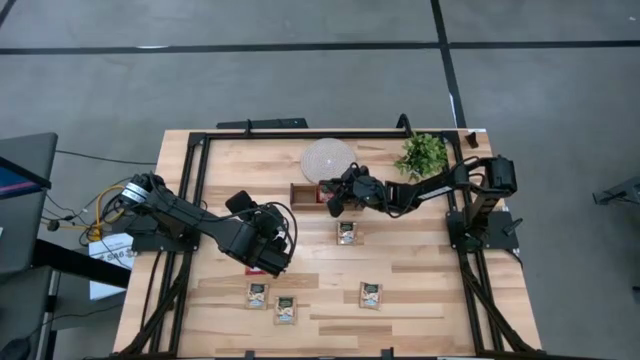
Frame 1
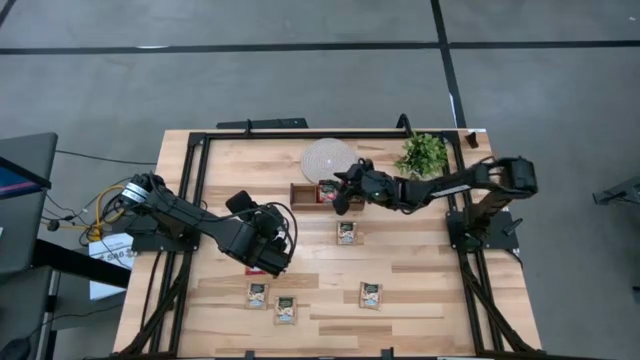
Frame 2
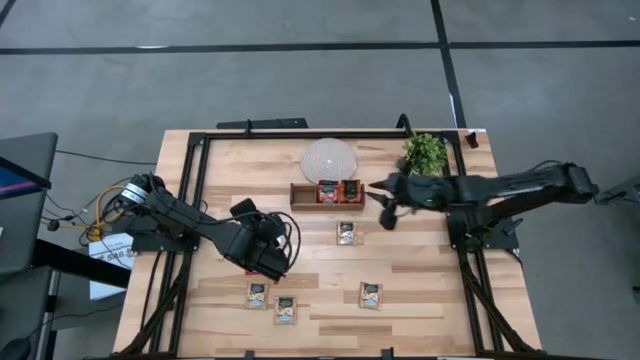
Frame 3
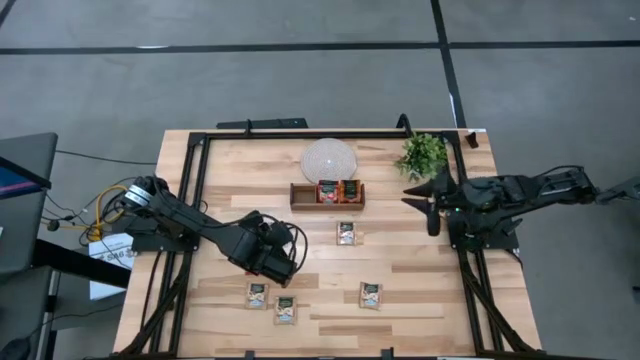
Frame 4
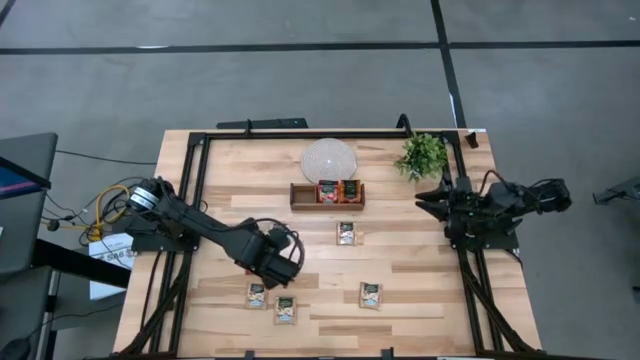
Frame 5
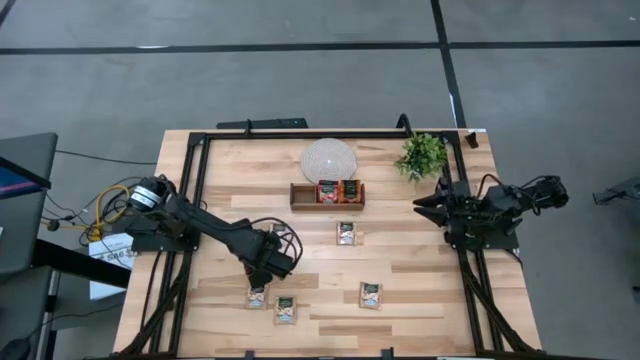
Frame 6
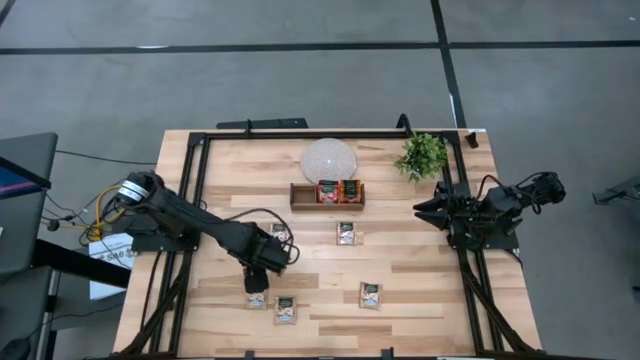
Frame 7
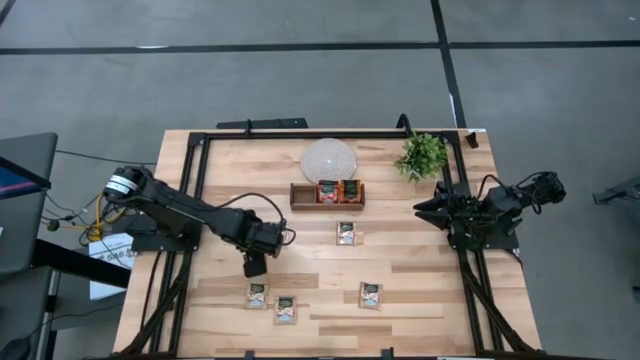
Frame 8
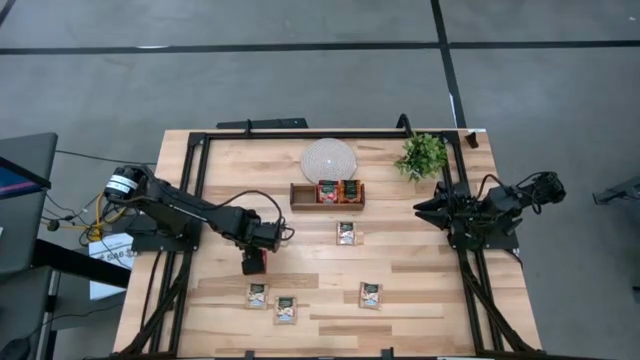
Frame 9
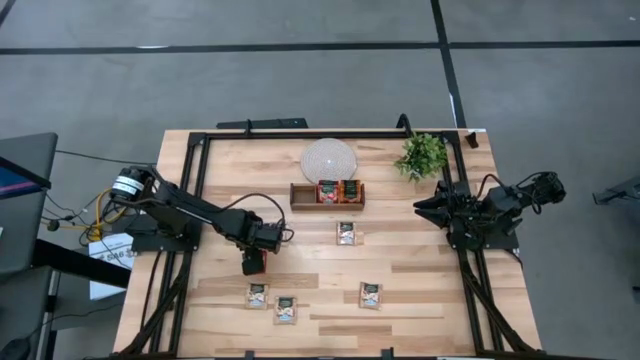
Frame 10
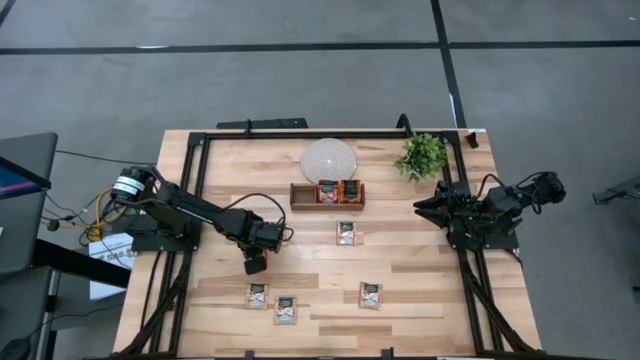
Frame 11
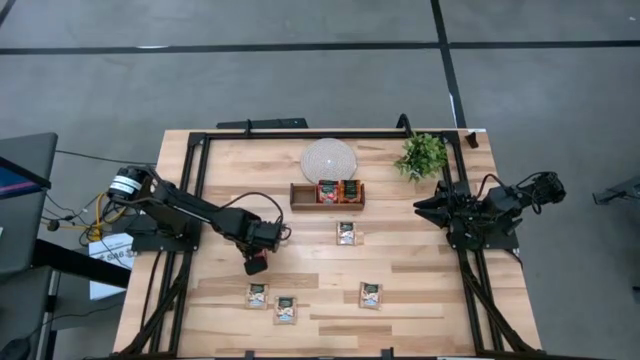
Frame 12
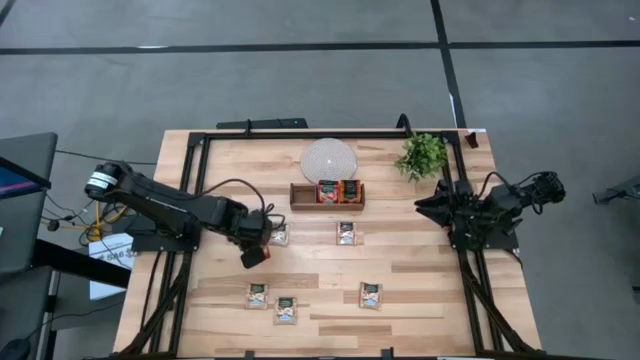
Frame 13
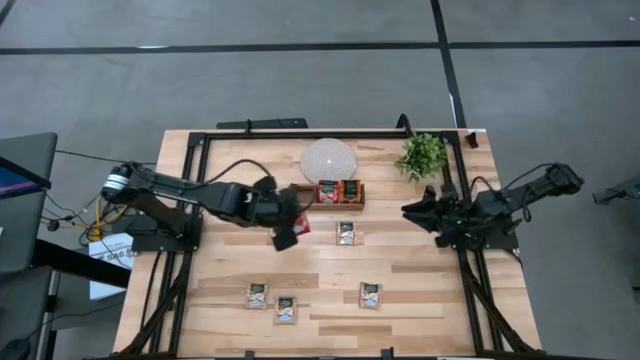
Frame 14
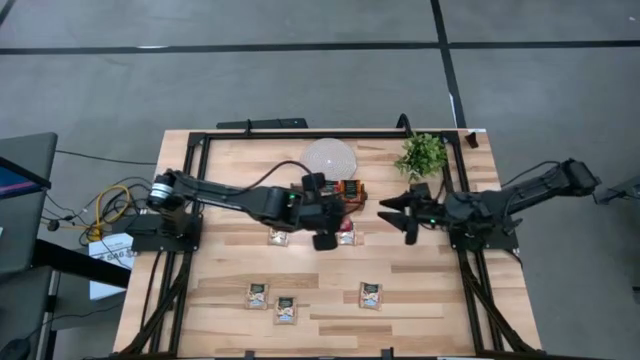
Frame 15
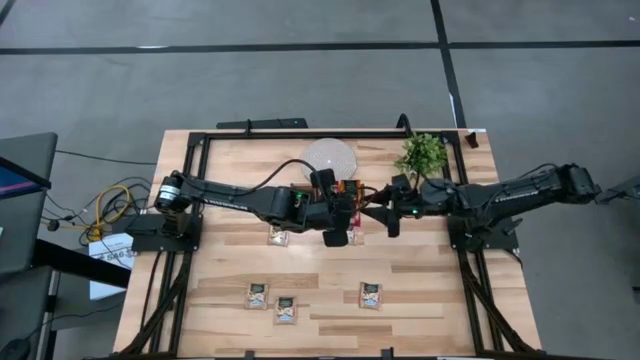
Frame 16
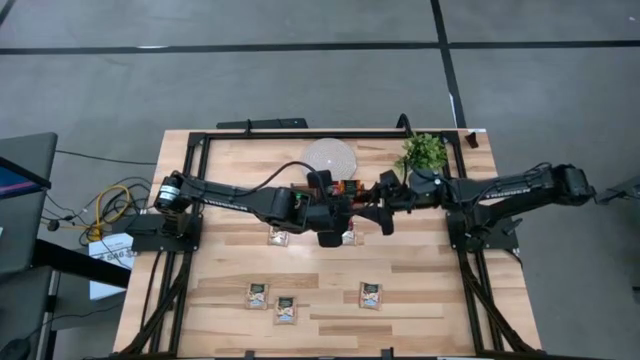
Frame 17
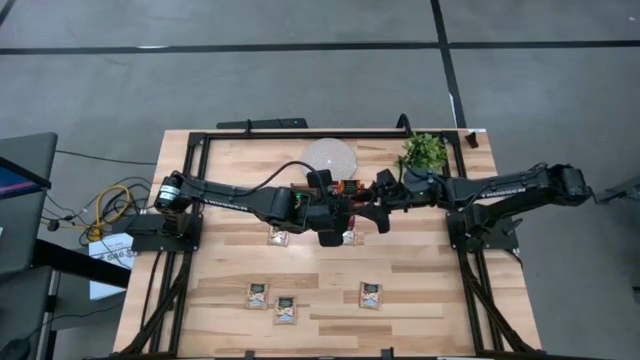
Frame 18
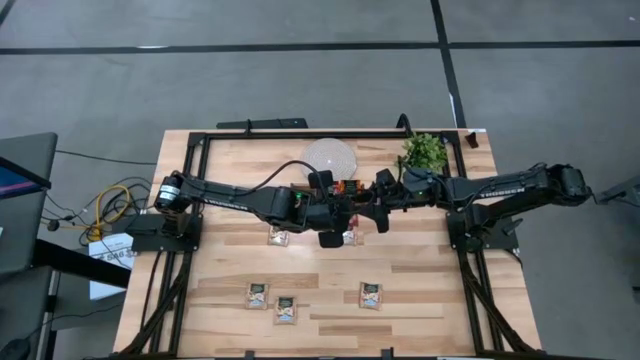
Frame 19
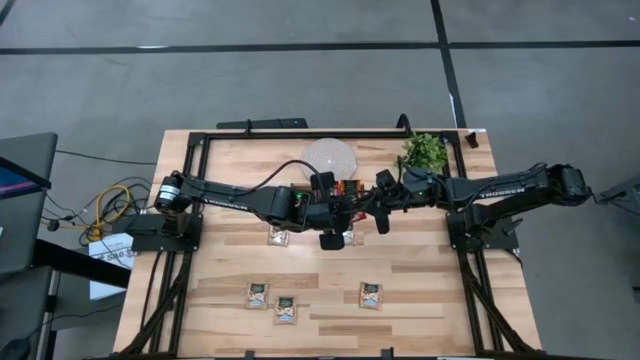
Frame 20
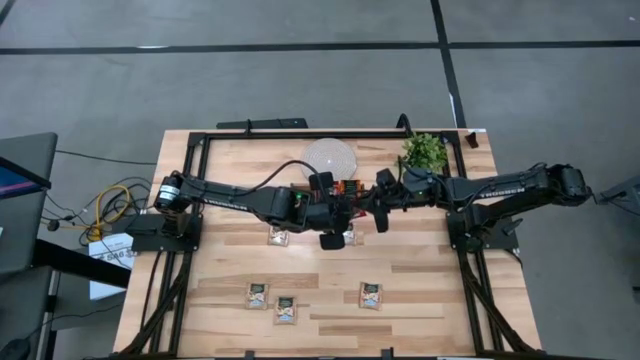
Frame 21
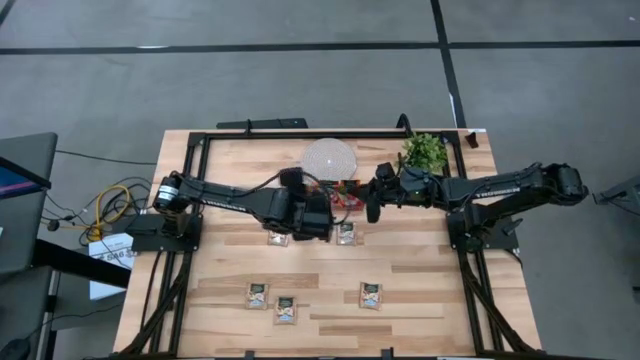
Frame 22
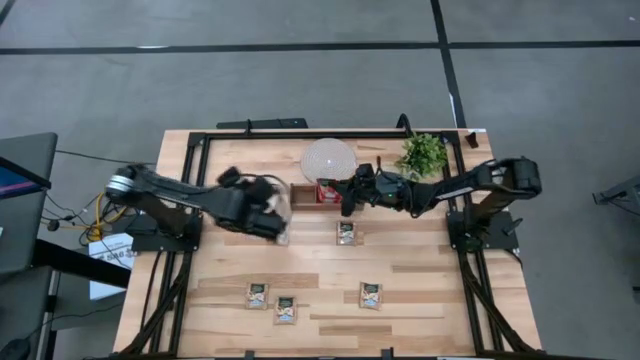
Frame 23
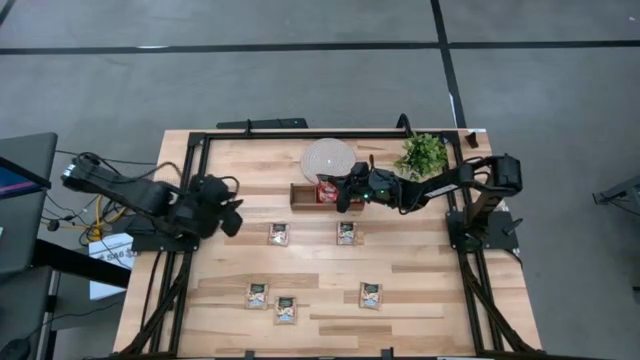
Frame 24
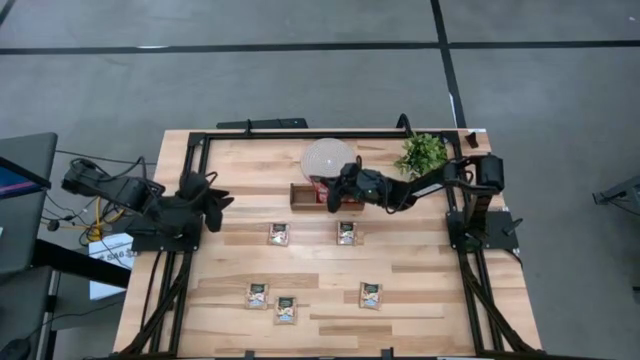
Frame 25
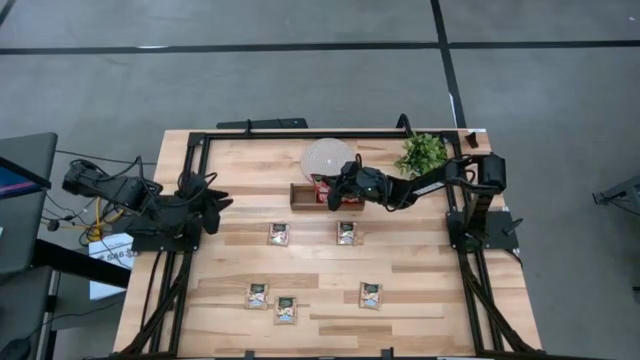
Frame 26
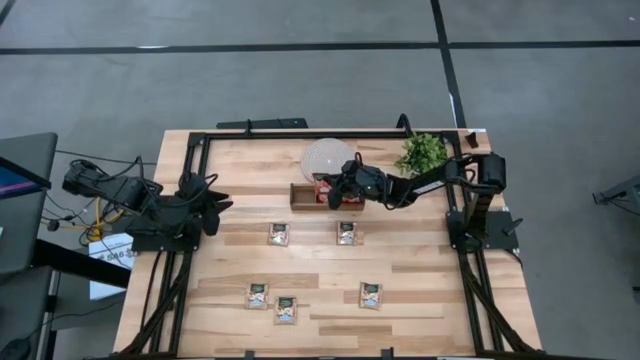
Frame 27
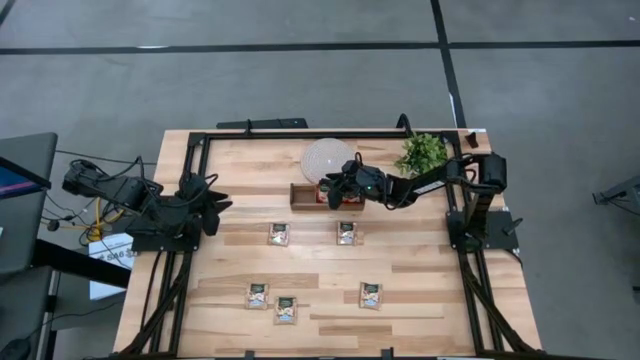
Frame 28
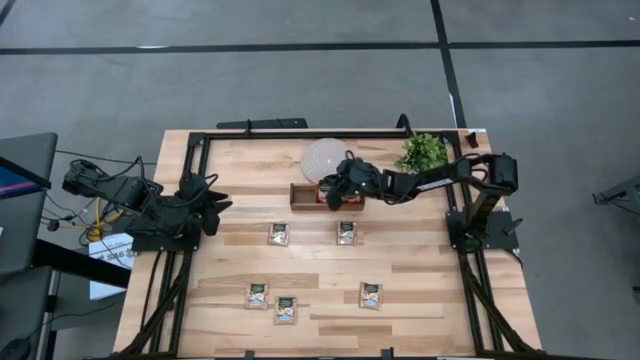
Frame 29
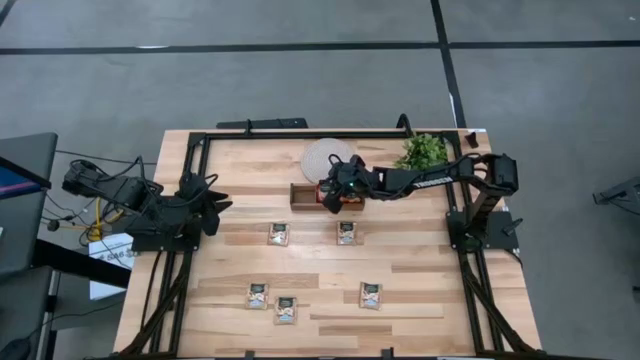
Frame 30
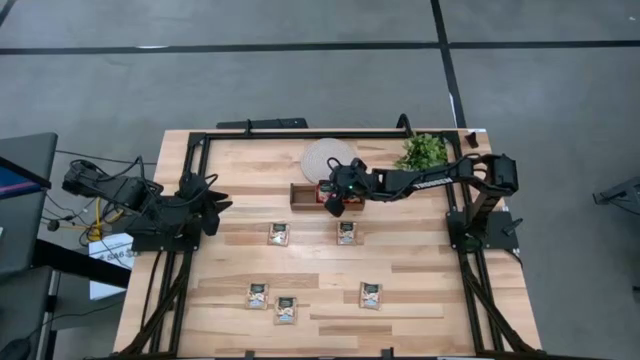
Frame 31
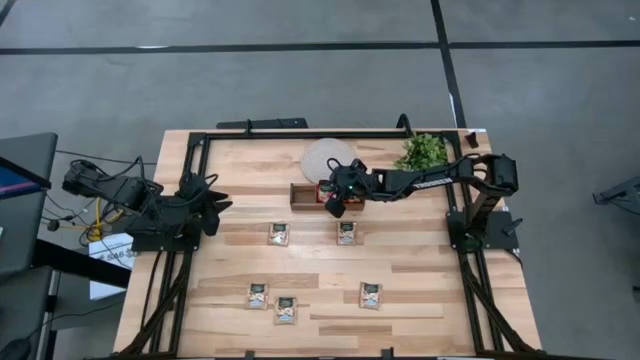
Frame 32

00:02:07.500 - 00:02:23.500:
Task: Pick & Place Tea
Put the red tea bag into the middle compartment of the wooden organizer

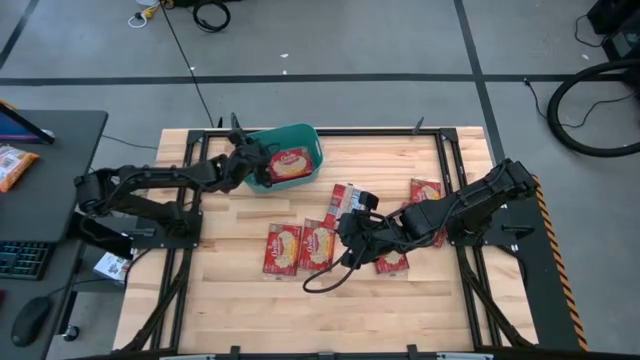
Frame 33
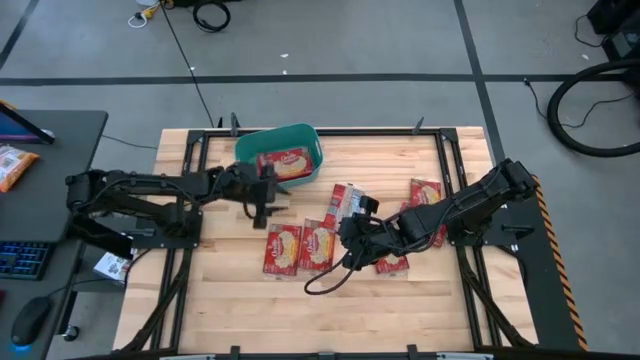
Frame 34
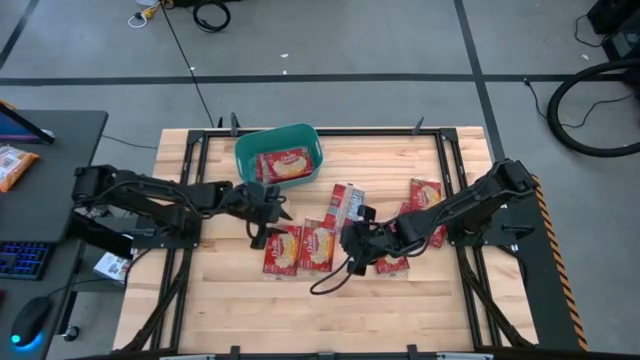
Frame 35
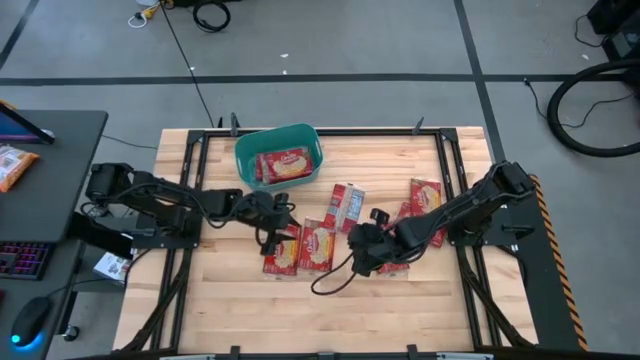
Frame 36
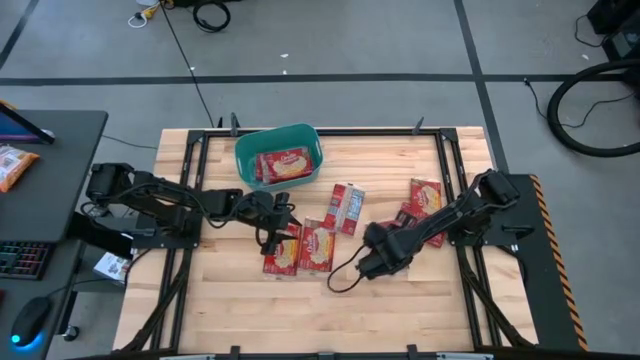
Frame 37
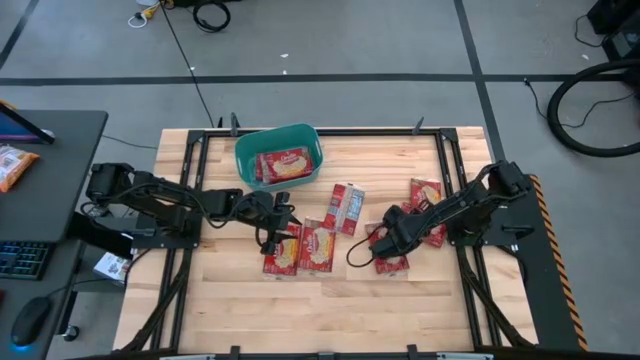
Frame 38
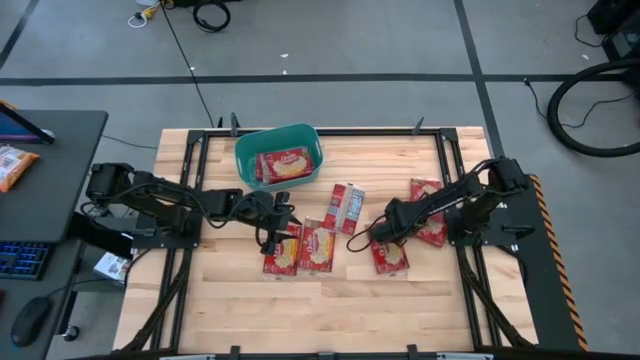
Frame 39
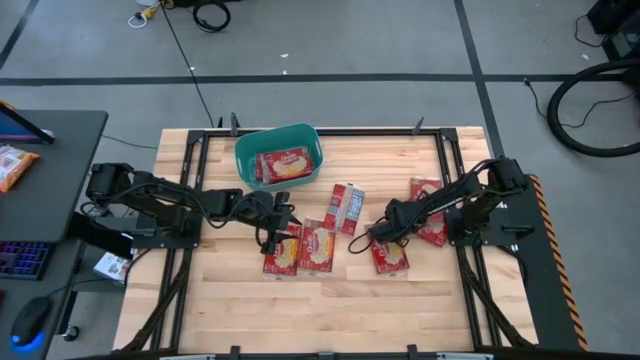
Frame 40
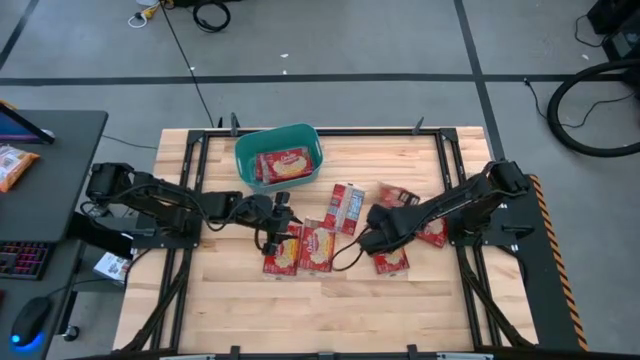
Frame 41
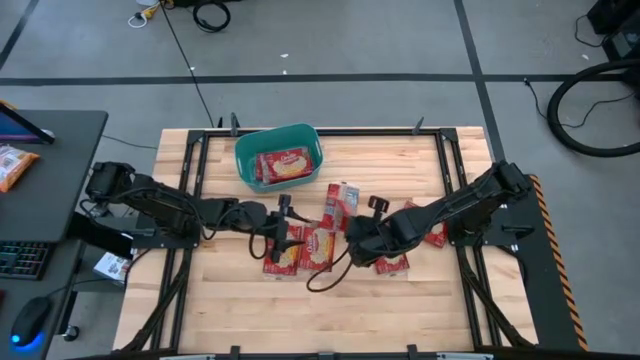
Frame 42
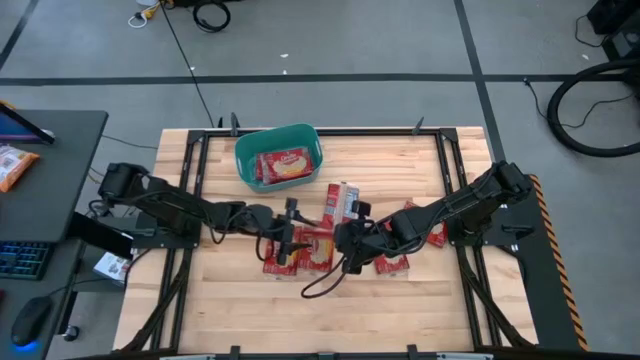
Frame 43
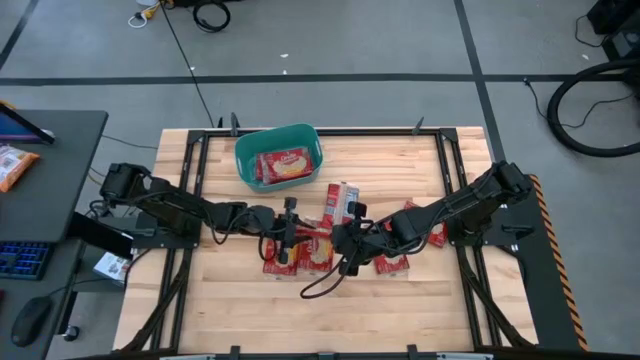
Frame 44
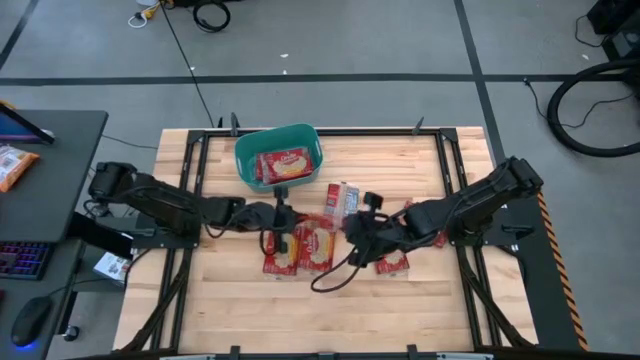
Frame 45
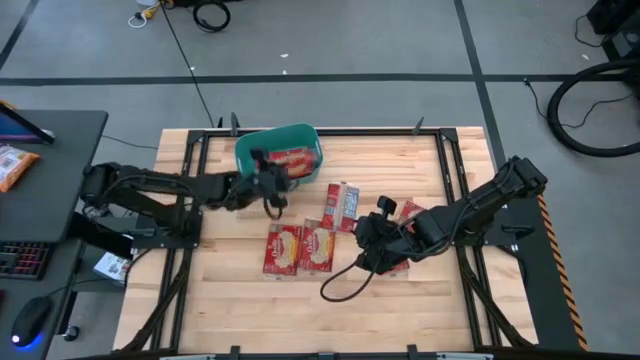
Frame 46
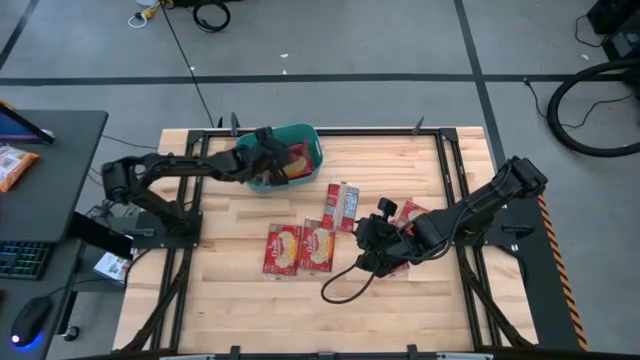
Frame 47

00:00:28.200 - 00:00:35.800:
Task: Sort popcorn bags into baskets
Put the red popcorn bag into the green bin
